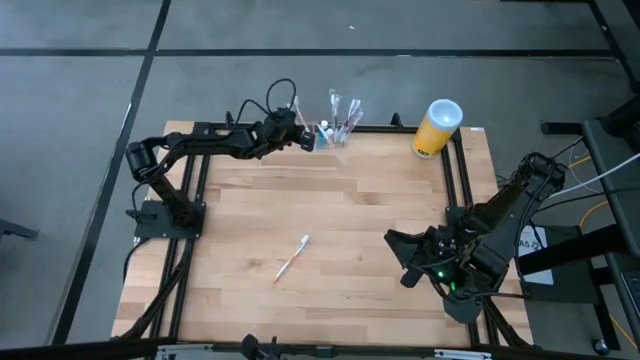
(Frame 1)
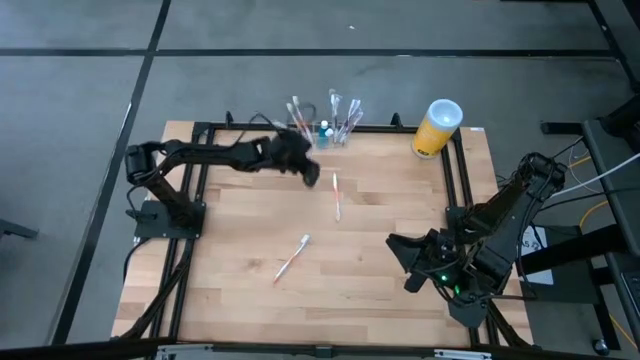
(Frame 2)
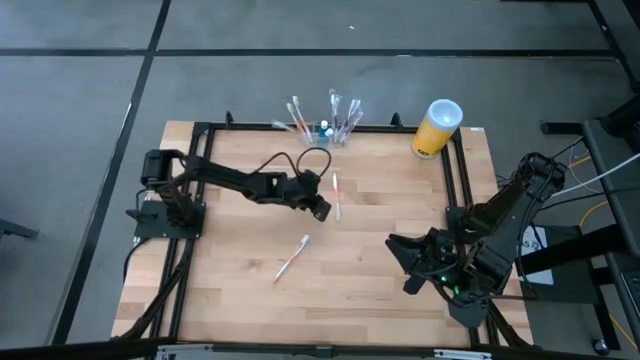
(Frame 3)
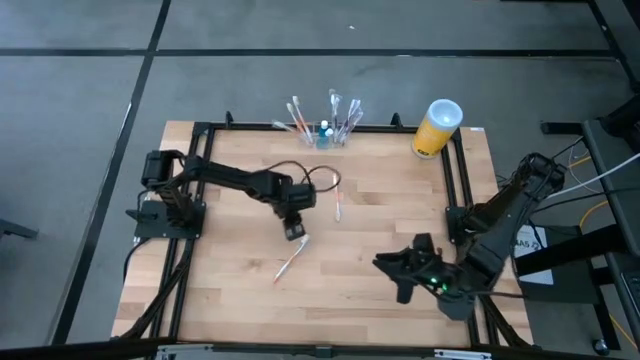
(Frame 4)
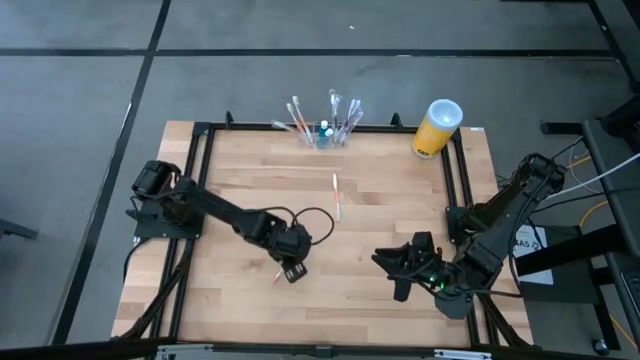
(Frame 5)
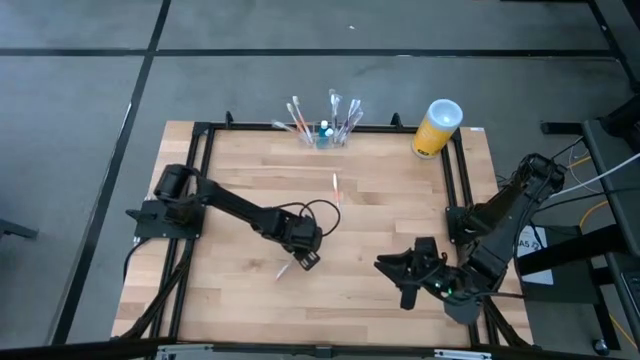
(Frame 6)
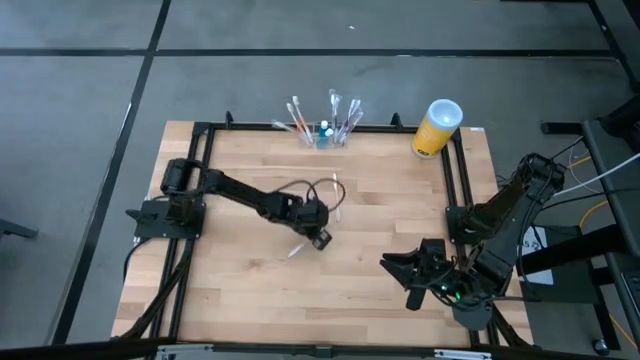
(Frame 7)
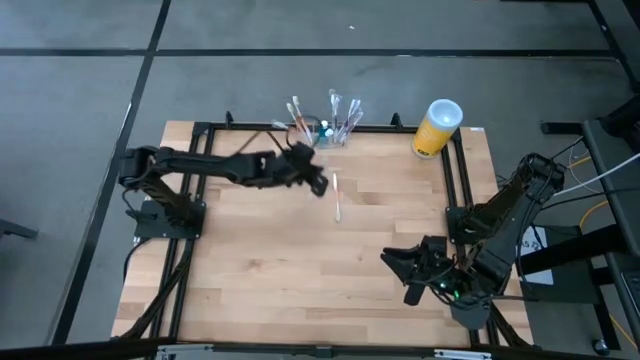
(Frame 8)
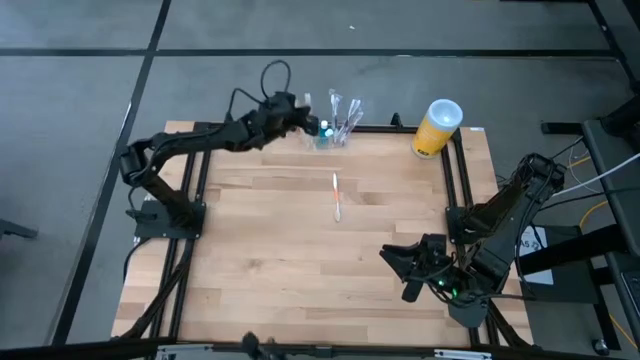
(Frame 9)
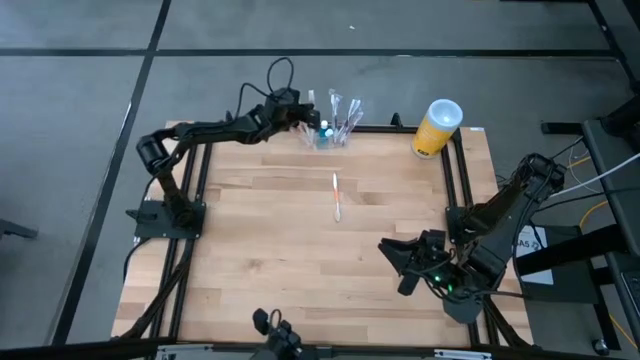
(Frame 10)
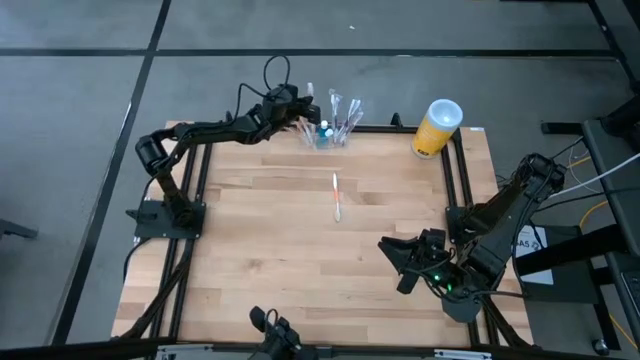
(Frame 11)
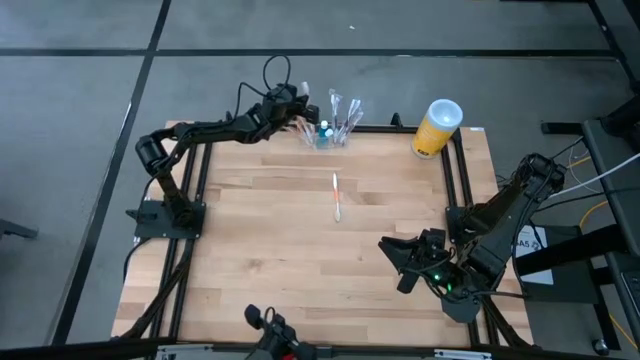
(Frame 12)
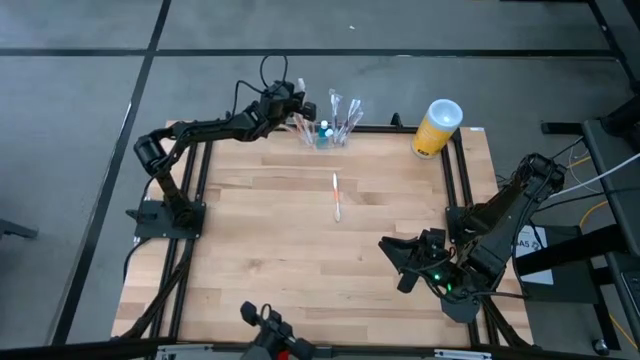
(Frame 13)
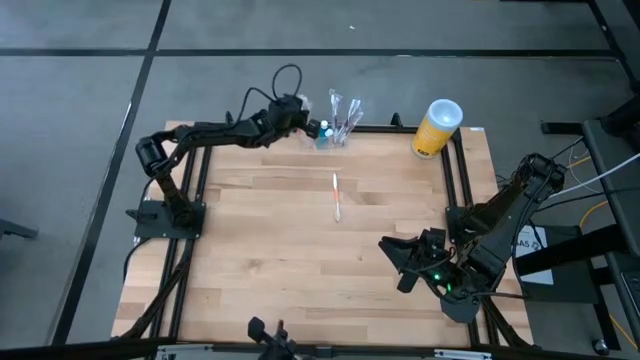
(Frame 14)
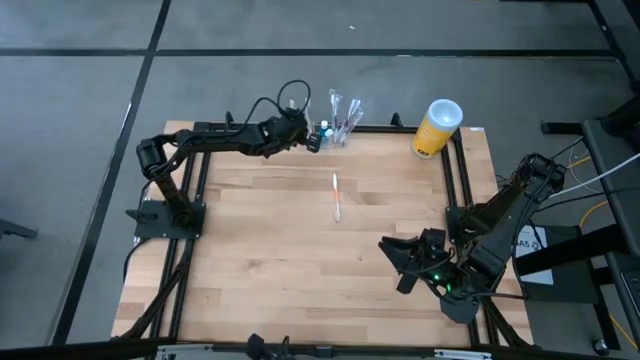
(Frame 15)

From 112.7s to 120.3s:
Task: Pick & Place toothbrushing station
Put the orange toothbrush into the transparent organizer

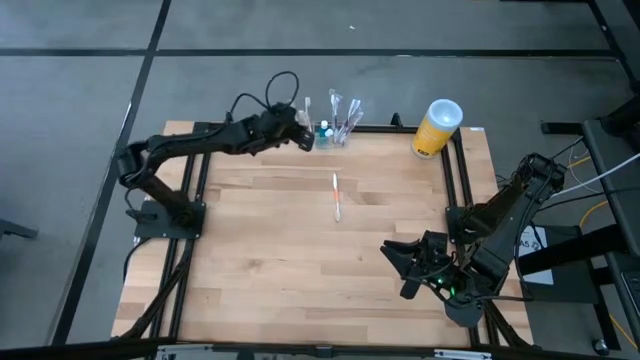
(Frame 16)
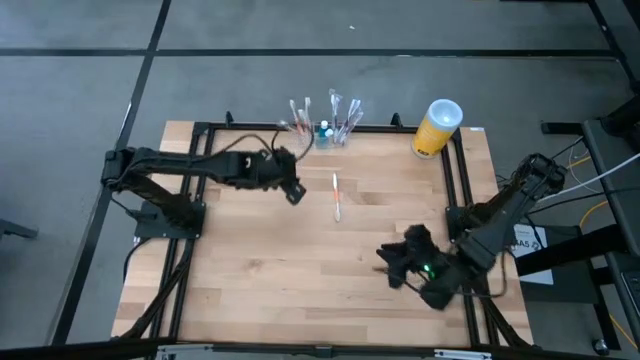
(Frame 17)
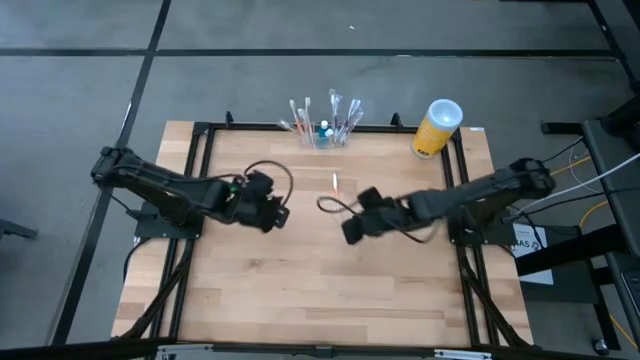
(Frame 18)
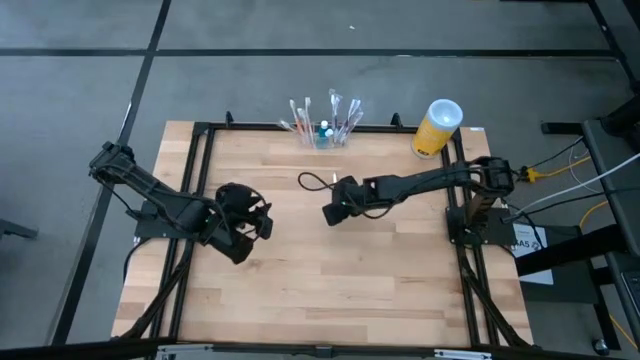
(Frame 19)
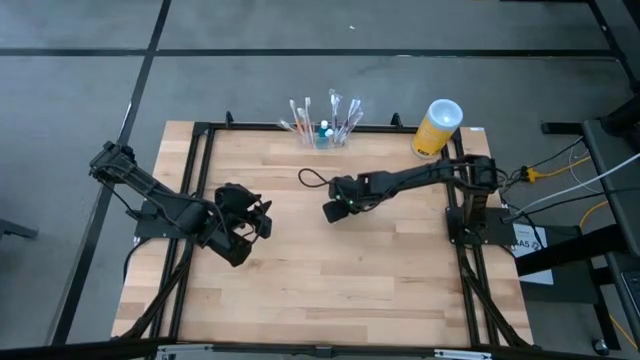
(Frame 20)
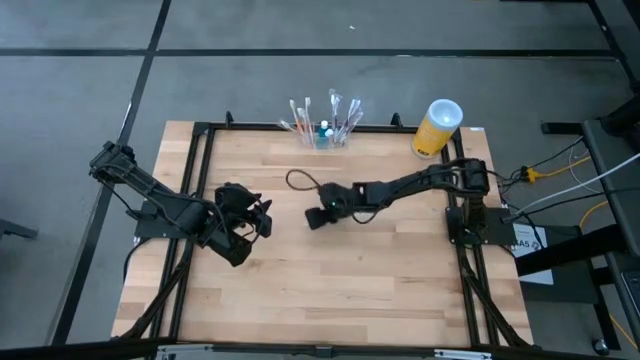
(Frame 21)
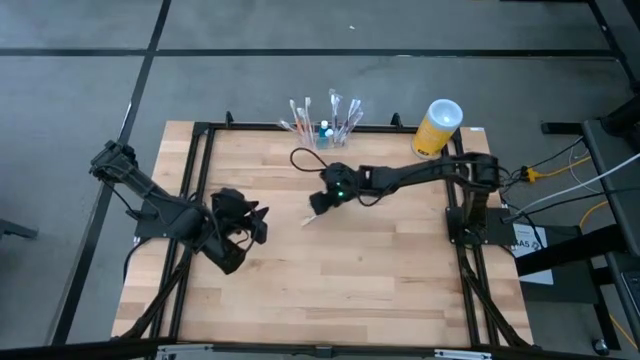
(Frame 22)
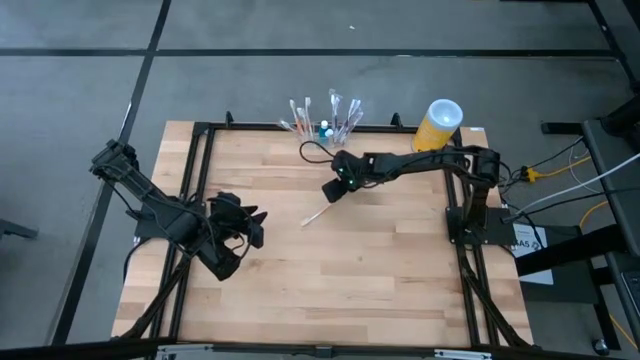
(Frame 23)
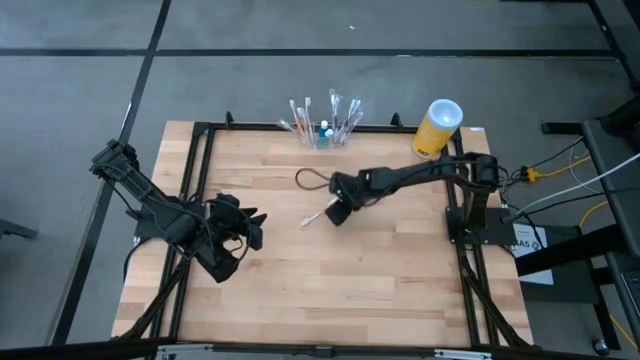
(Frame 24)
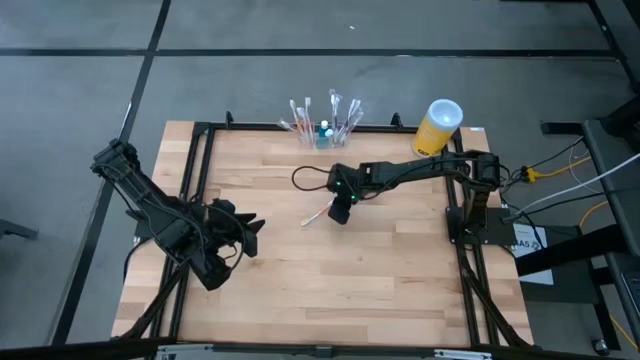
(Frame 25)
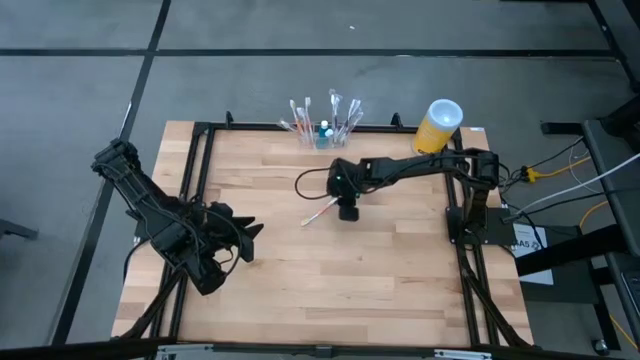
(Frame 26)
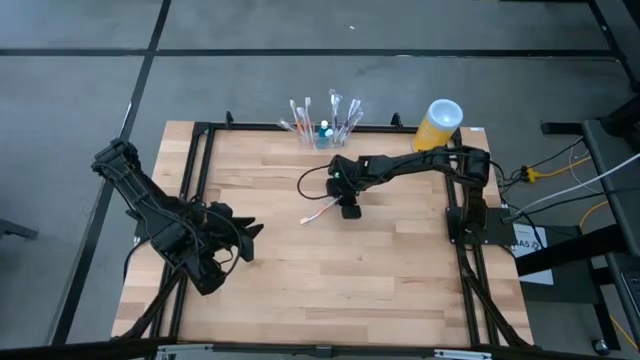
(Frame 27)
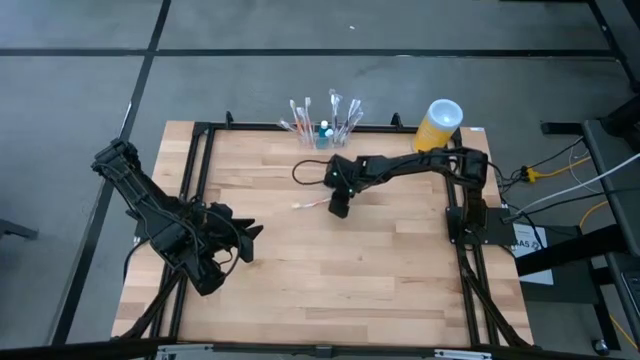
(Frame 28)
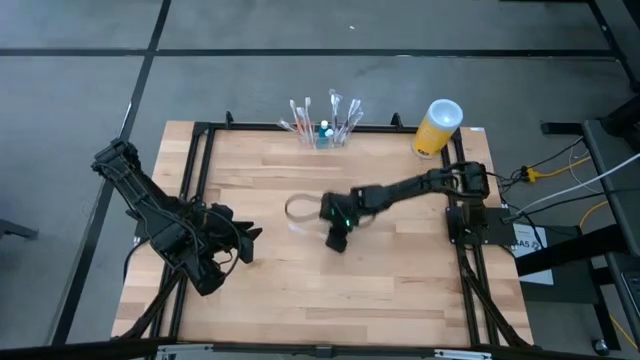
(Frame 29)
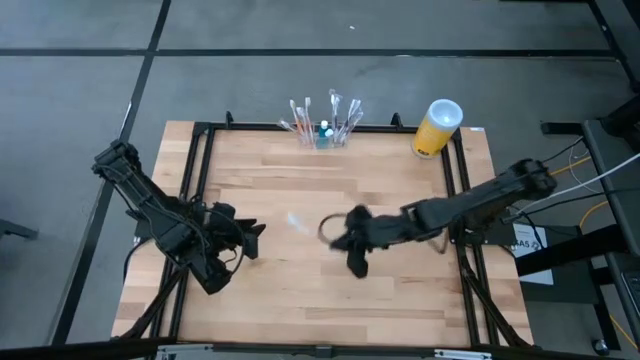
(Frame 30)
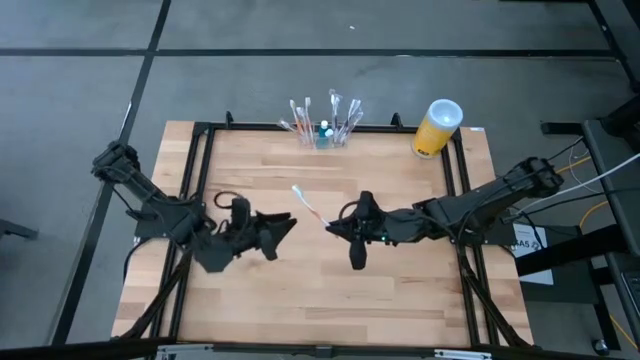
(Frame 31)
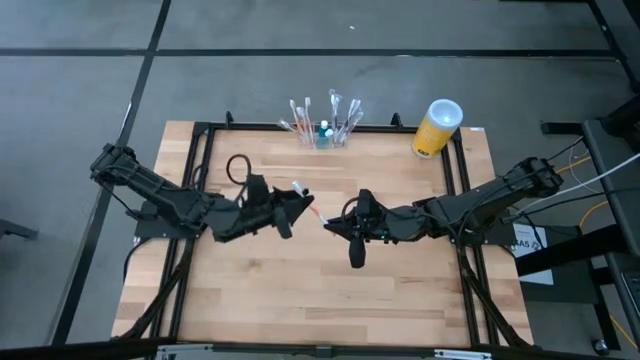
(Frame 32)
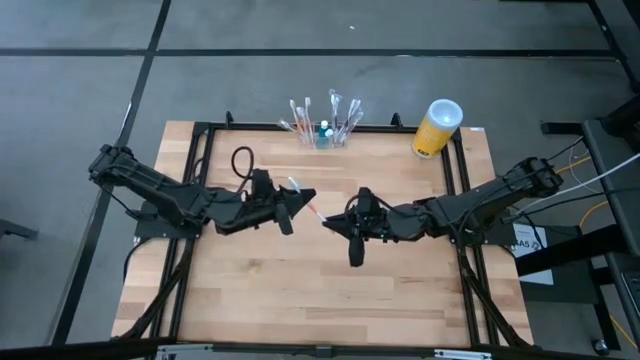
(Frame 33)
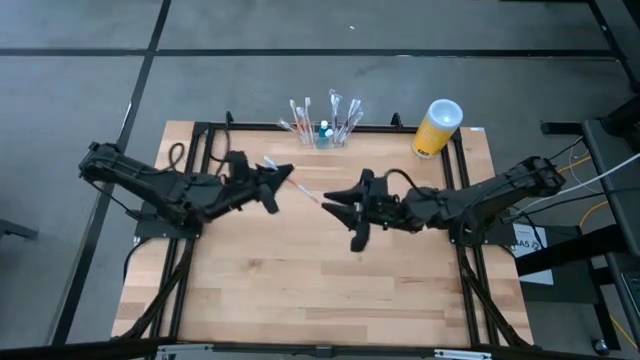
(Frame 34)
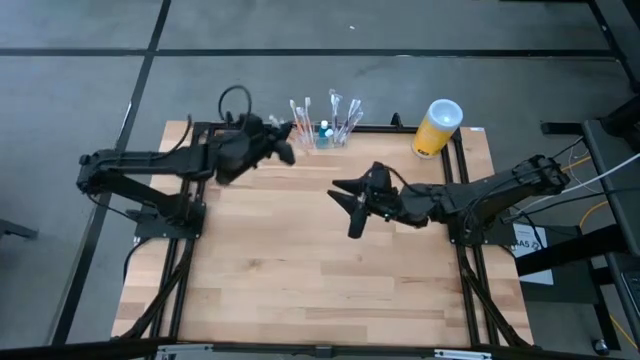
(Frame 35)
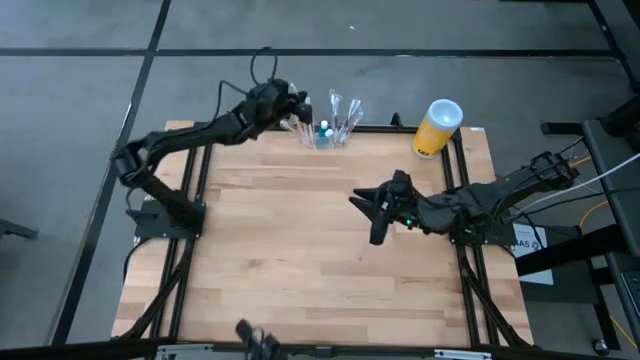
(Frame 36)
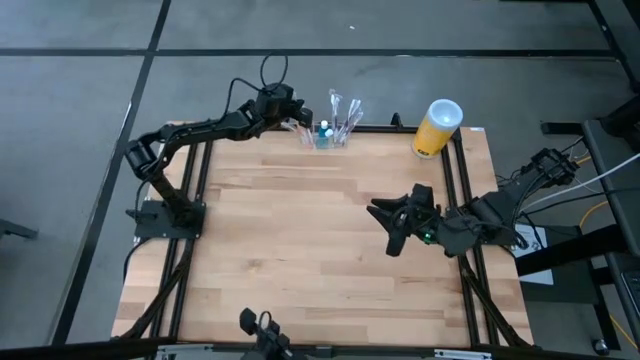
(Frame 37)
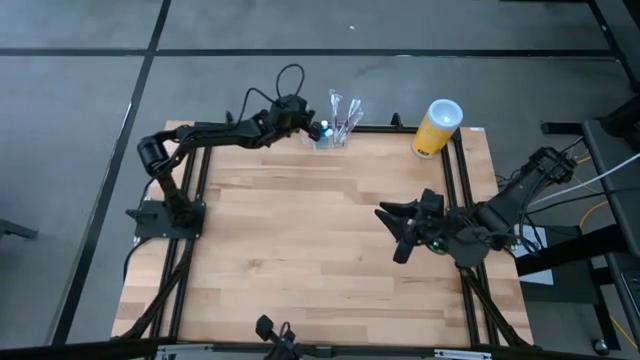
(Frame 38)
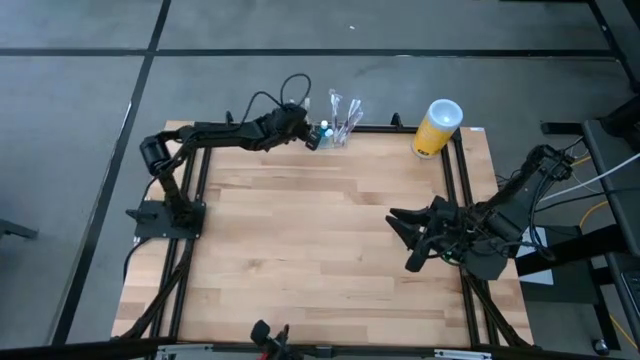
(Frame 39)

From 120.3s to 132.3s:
Put the orange toothbrush into the transparent organizer

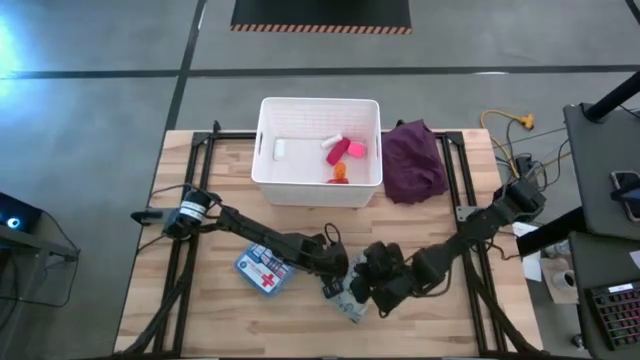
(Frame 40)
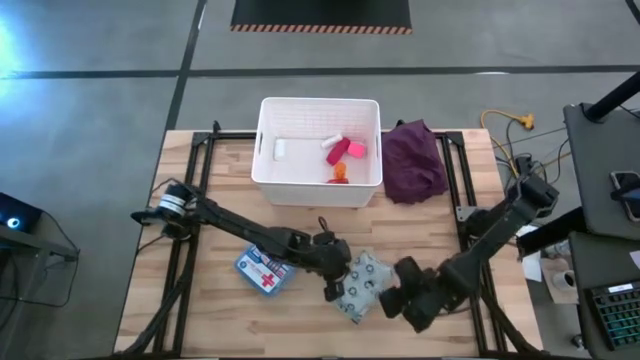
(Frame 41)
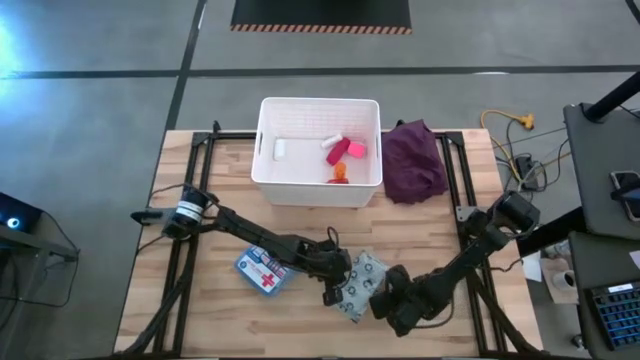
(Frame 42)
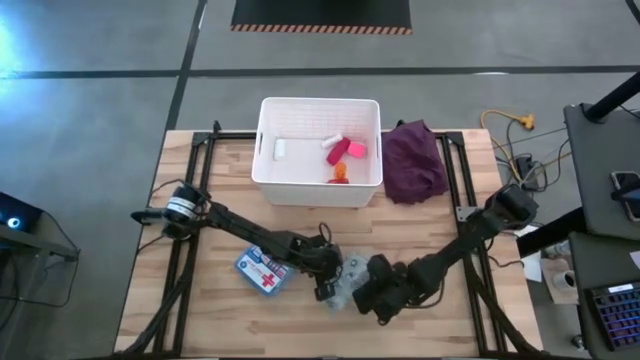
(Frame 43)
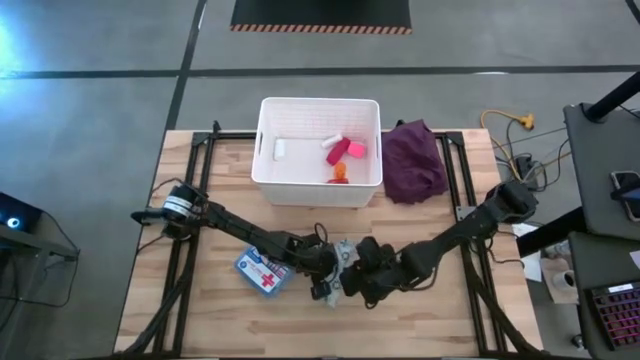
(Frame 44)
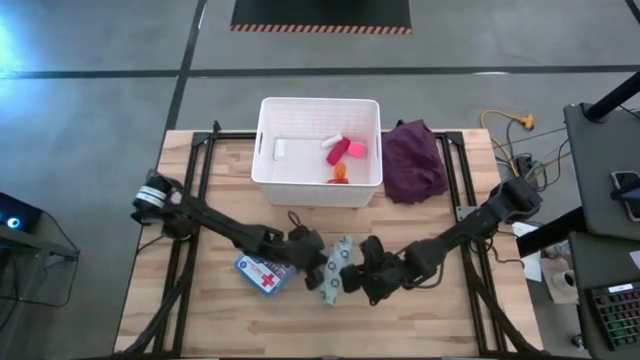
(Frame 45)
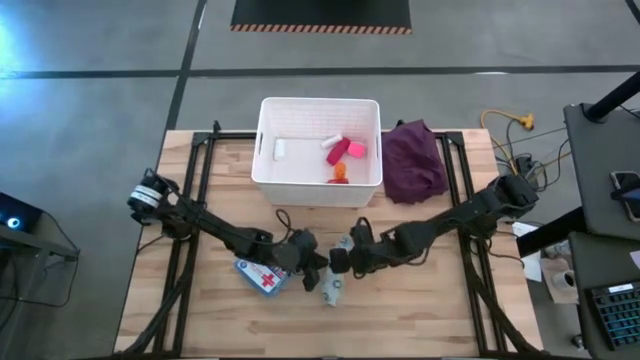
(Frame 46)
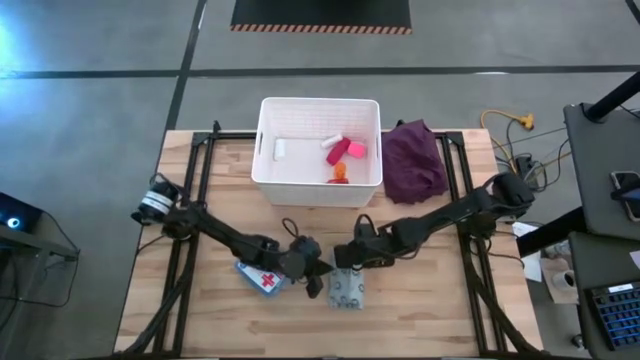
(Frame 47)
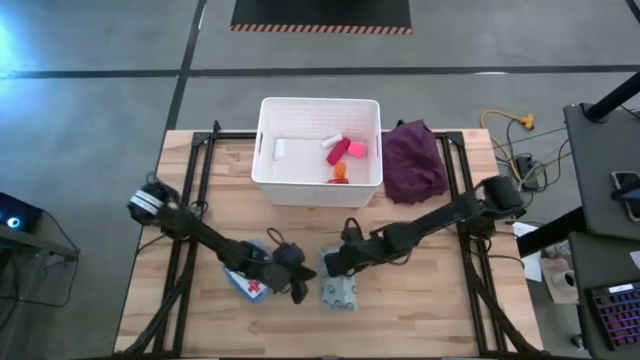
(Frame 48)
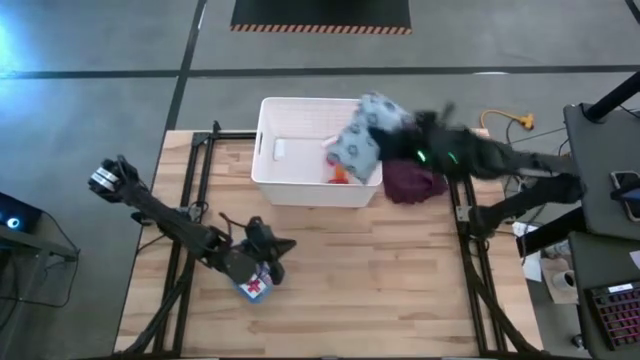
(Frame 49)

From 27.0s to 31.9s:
Task: Pick & place medical supplies in basket/bin
Put the medical supply bag into the white bin
